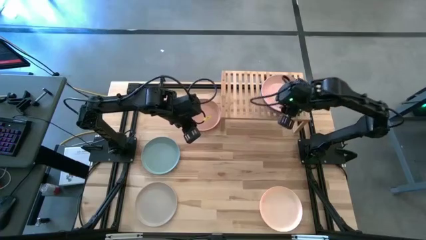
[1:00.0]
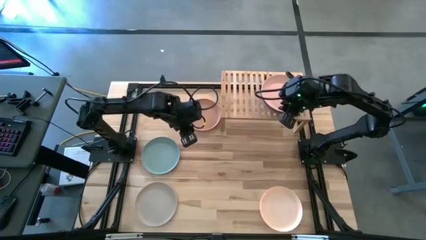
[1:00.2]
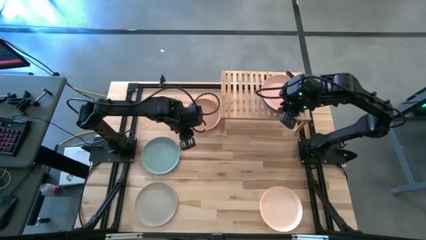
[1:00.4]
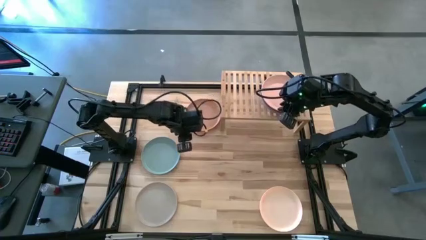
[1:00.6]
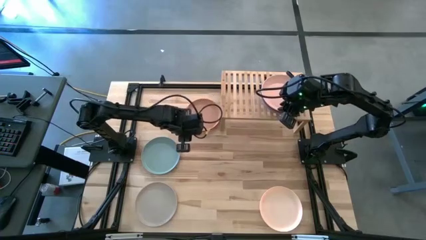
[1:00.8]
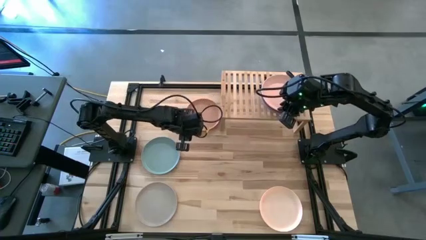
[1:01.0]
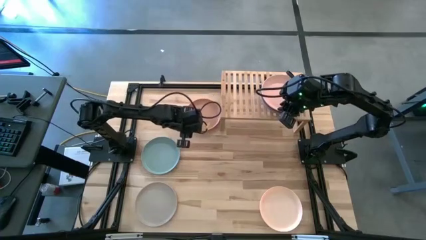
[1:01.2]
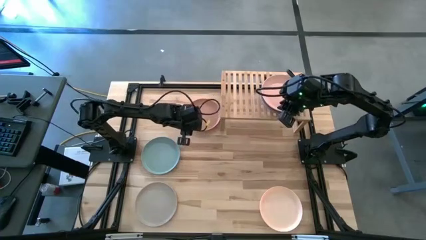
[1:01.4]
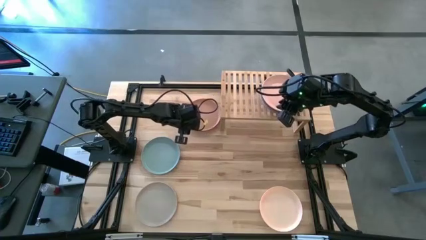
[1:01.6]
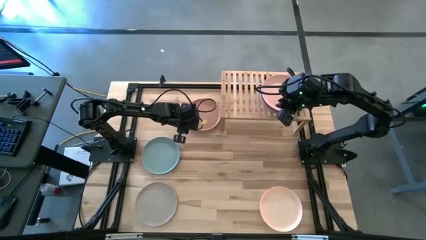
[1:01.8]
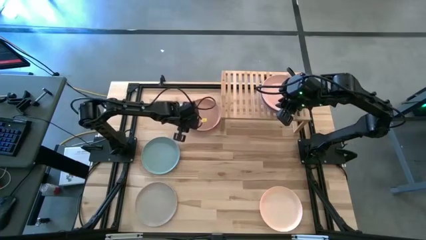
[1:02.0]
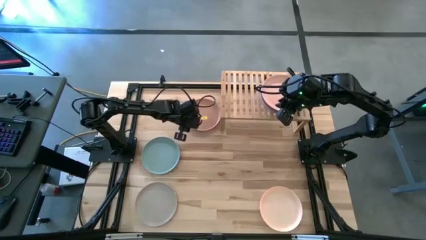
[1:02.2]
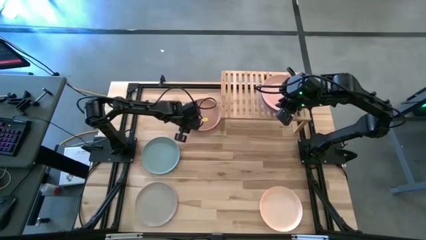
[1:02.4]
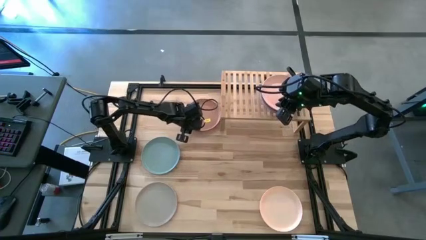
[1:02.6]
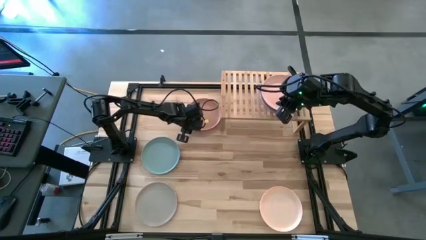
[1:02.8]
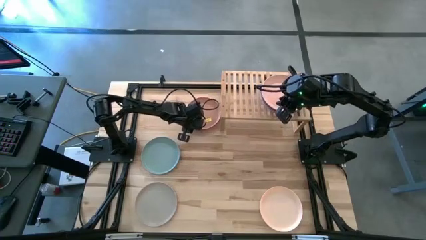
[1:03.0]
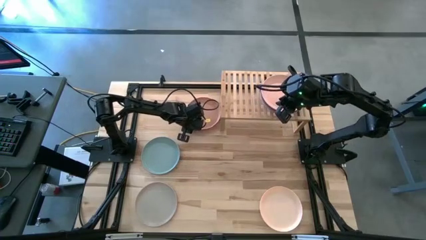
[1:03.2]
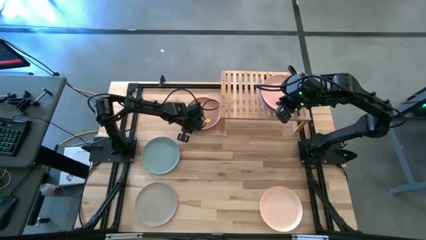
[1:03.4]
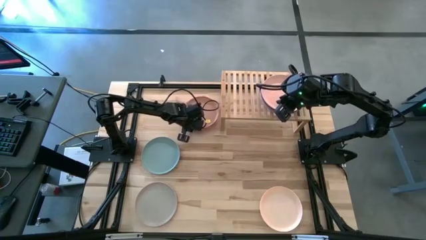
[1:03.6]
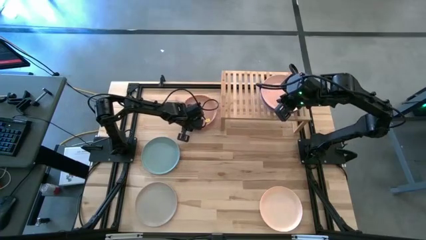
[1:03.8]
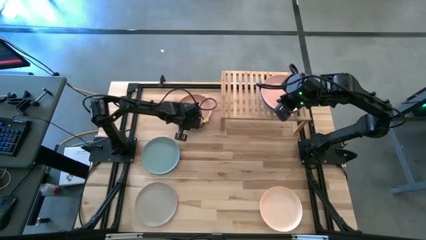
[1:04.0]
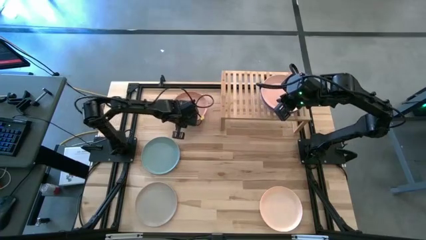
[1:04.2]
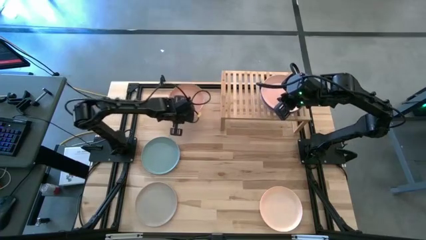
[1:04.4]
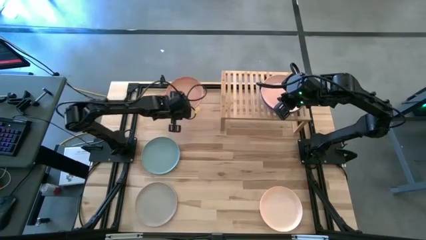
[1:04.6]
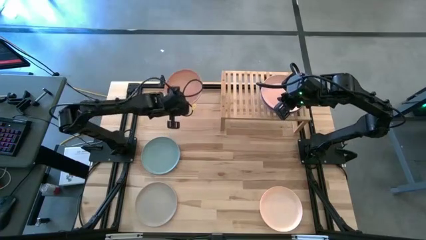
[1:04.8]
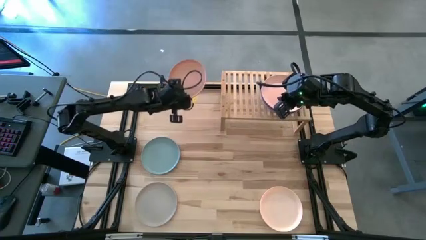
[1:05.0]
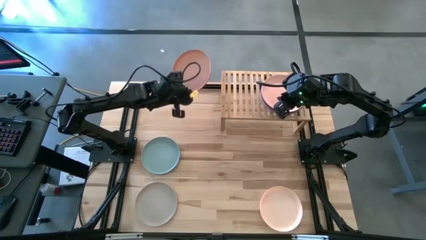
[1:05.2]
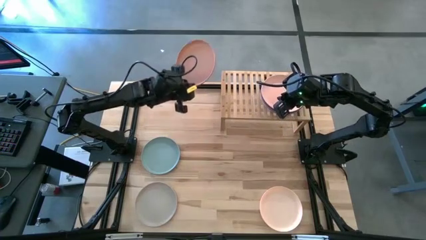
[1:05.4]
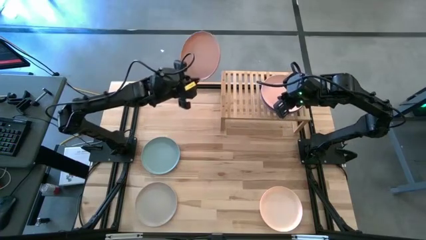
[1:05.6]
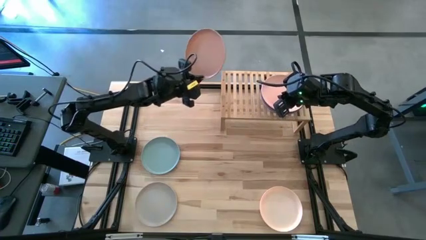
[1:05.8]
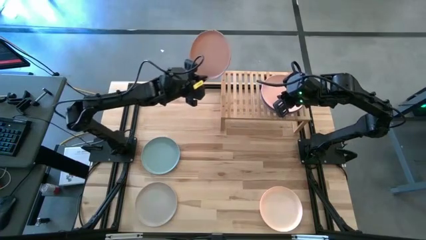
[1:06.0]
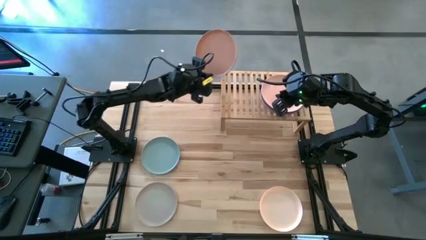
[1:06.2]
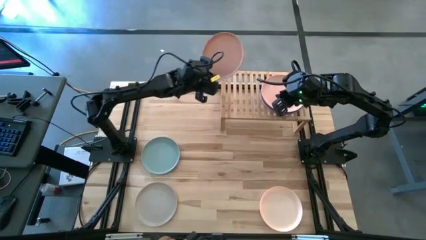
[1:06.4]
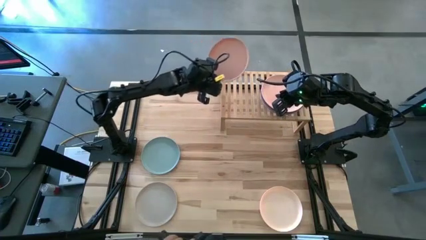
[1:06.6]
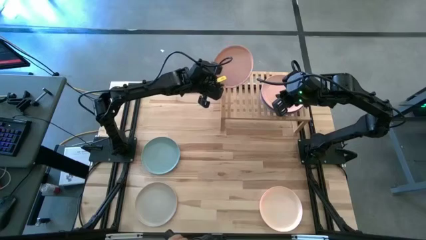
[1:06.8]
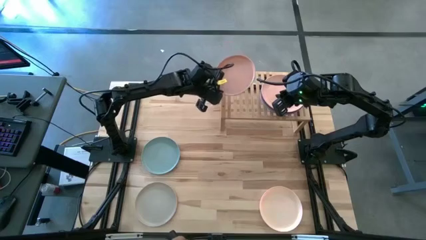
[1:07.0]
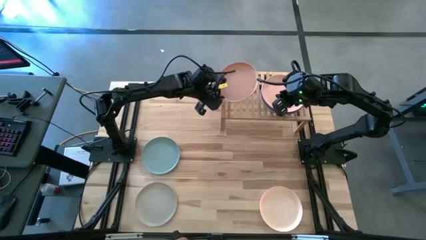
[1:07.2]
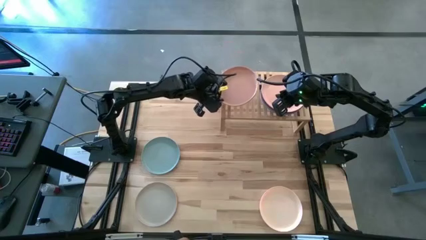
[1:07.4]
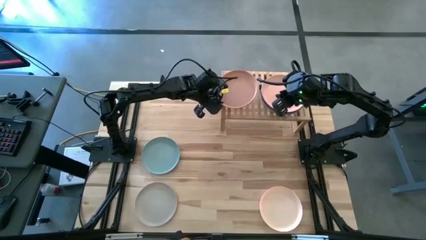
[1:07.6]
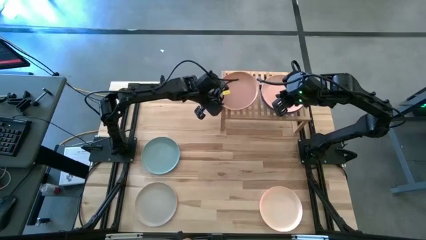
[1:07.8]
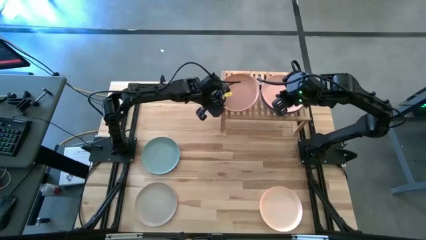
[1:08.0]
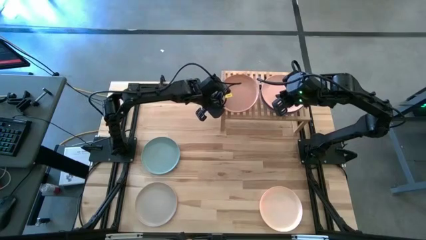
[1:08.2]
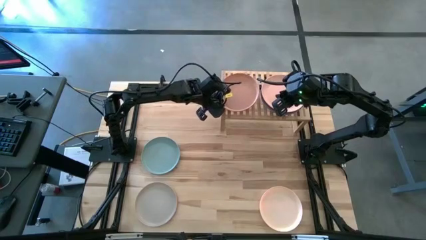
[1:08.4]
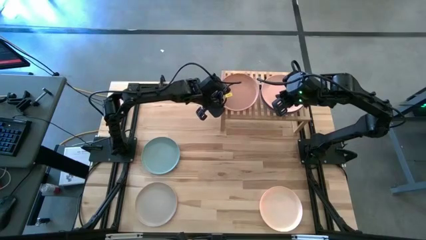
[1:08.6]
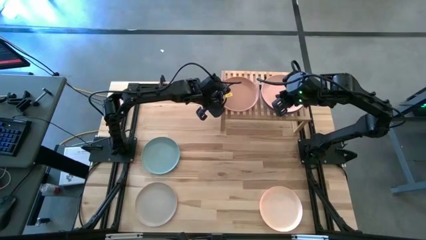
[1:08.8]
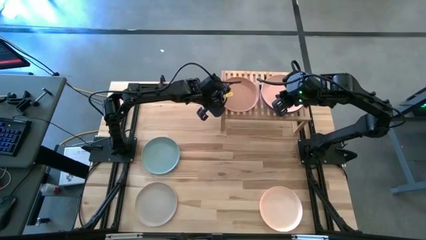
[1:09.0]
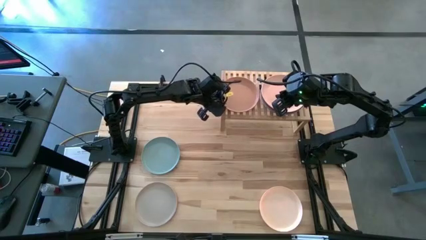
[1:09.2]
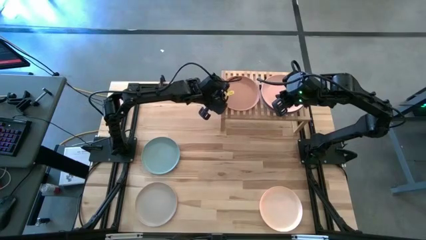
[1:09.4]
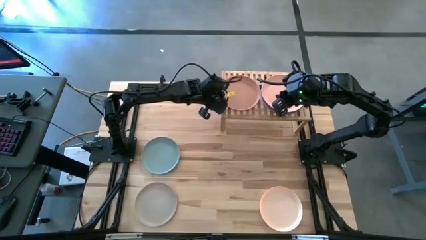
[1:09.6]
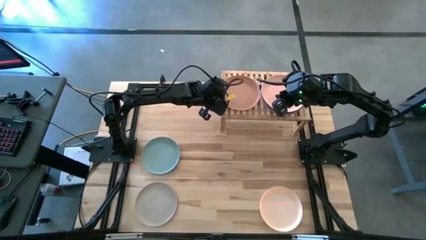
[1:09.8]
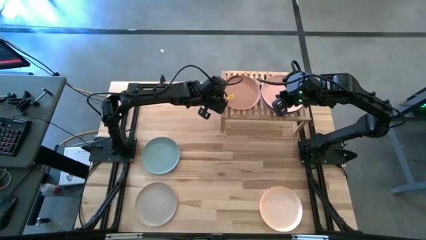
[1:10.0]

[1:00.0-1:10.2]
Task: Place and stack plates onto a shelf
Put the light orange plate on the shelf

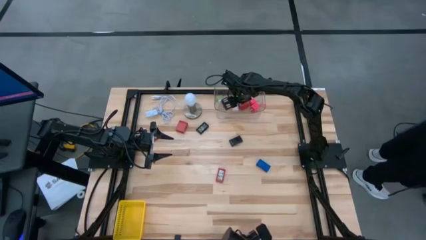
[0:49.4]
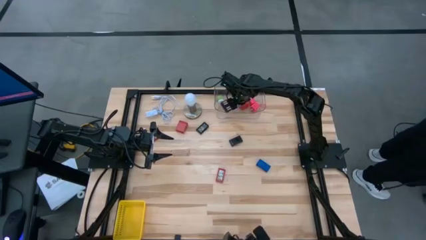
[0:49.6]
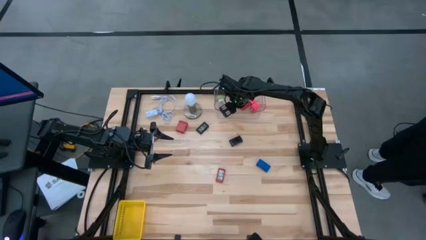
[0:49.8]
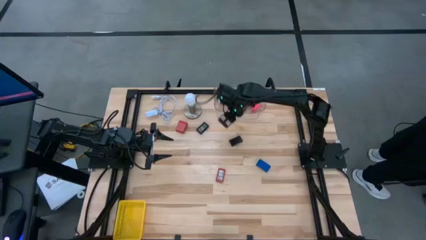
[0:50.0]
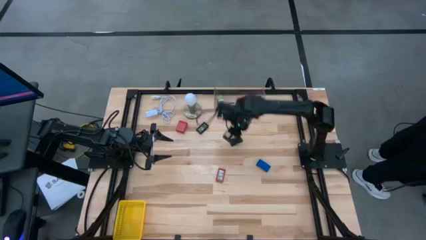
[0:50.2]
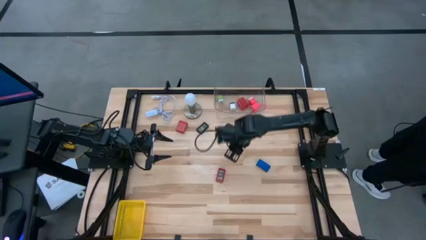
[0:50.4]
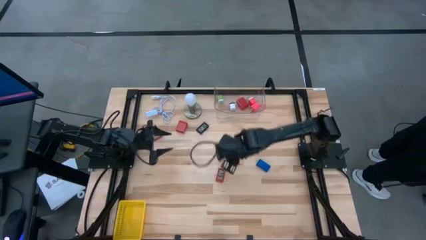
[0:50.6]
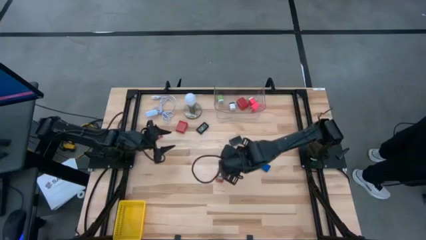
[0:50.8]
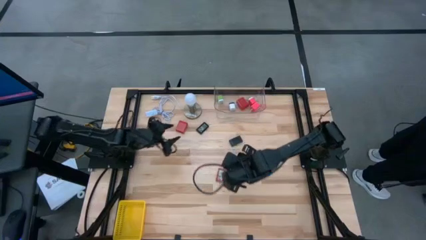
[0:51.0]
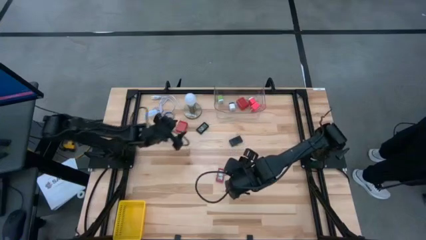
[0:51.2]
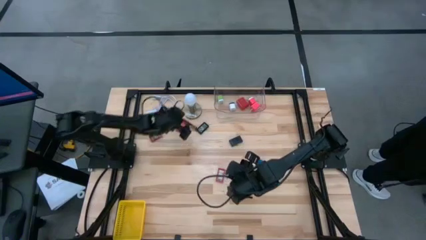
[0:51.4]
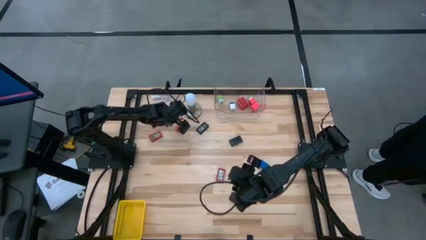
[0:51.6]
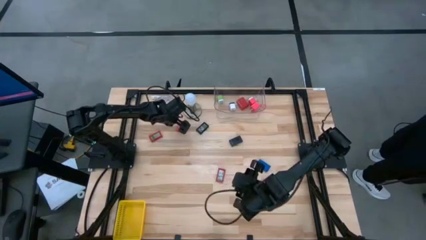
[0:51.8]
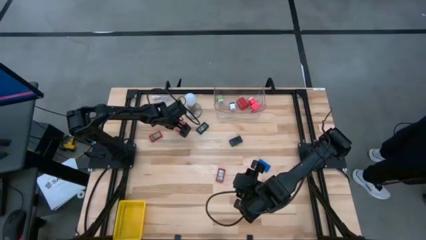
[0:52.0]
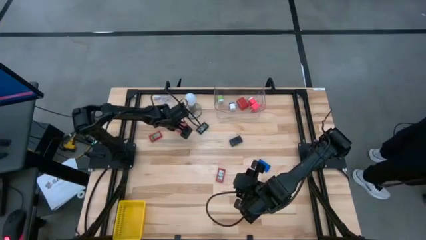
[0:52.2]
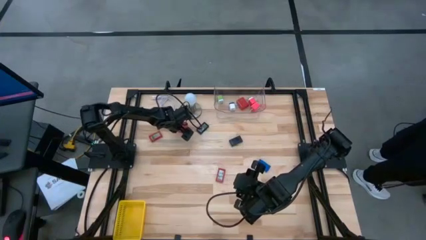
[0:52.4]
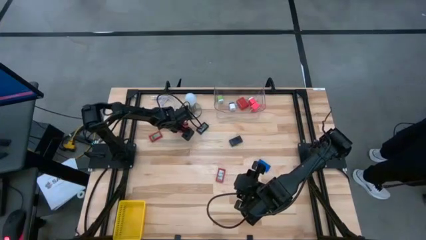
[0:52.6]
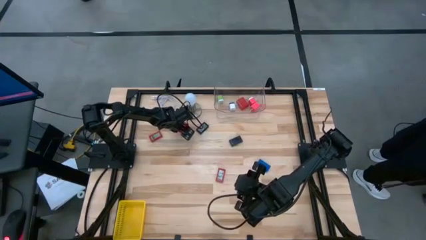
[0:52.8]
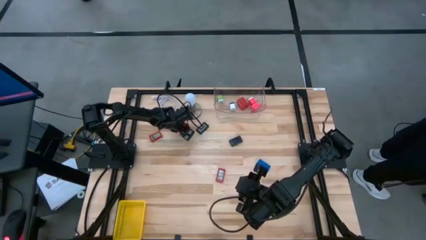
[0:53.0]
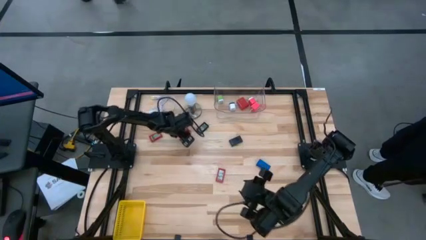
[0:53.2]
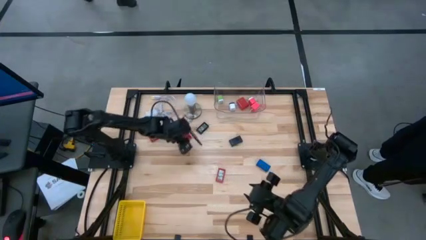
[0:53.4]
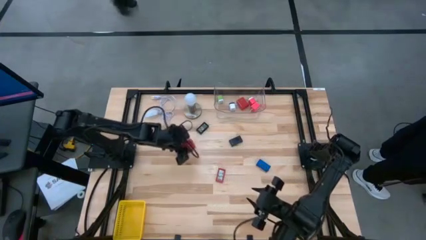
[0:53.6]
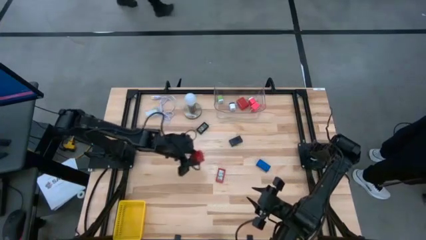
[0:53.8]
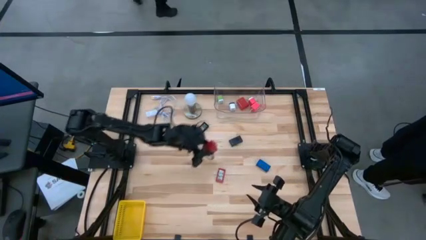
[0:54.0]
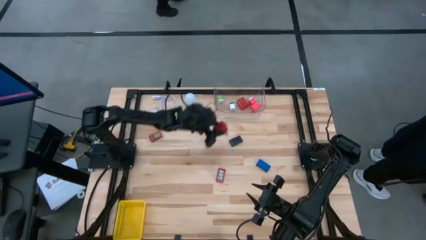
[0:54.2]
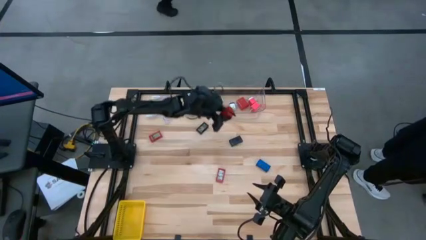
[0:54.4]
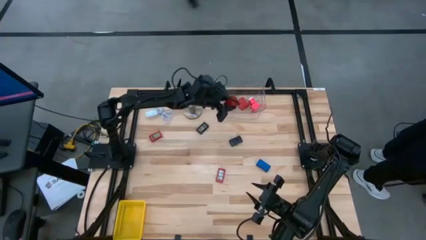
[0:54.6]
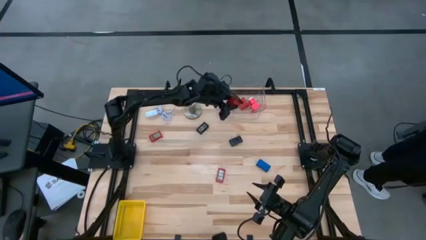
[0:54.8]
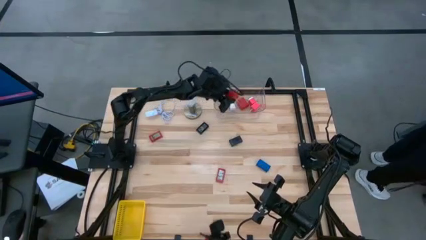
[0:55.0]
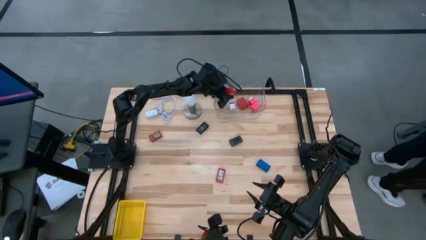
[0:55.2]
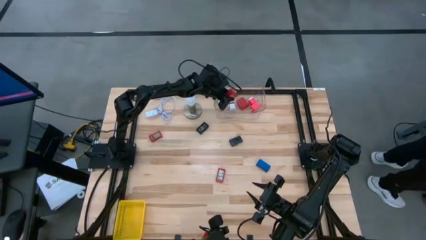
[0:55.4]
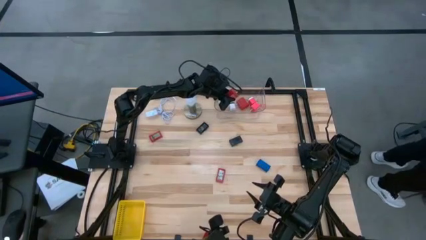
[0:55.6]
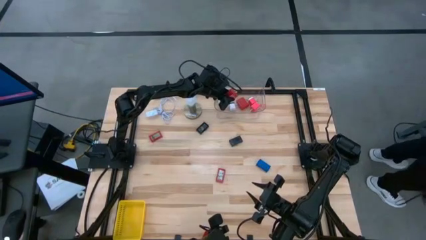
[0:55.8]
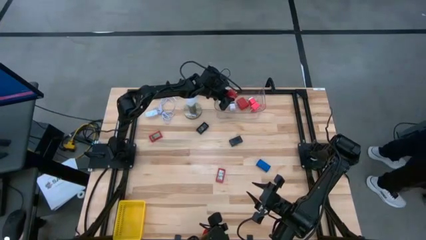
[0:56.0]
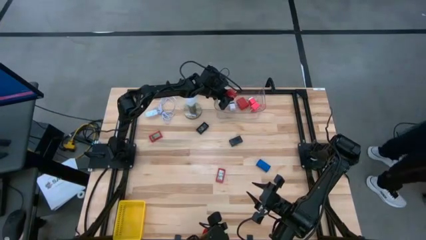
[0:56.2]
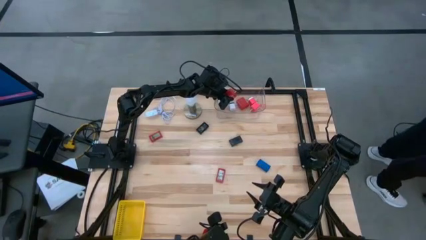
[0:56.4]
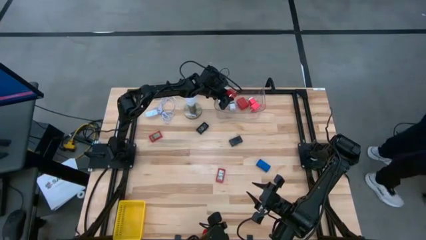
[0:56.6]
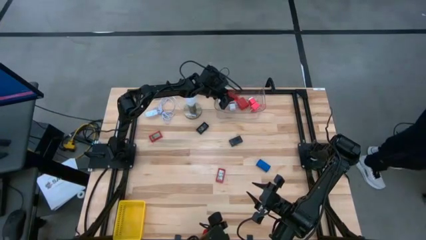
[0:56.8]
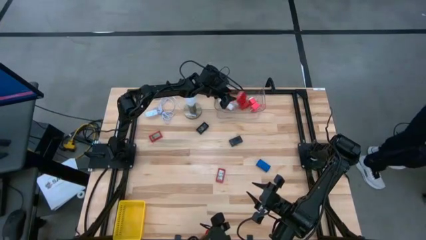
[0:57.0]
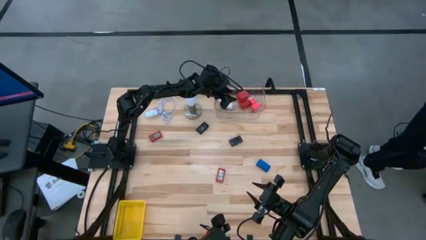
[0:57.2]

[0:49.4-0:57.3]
Task: Pick & Place Office items
Put the red charger adapter into the transparent bin
